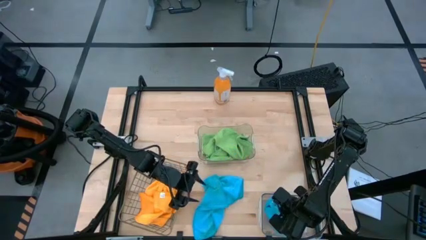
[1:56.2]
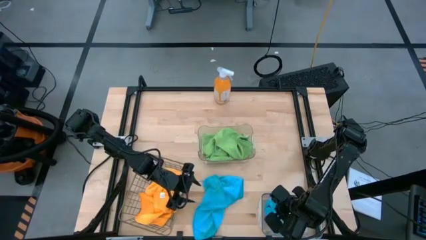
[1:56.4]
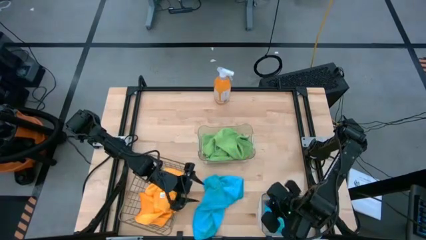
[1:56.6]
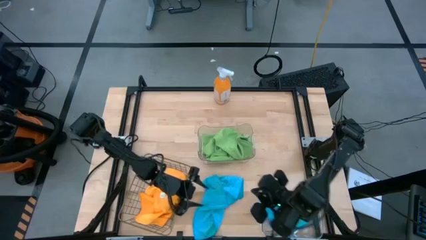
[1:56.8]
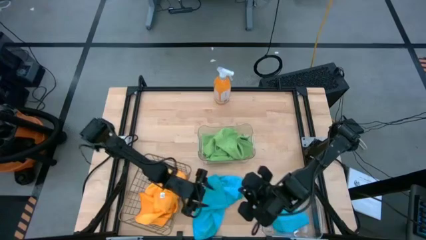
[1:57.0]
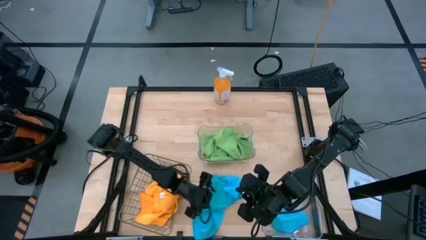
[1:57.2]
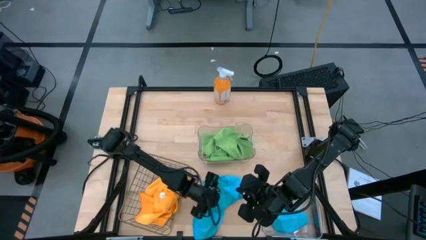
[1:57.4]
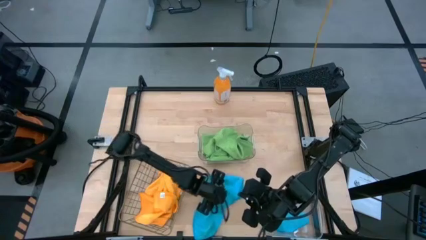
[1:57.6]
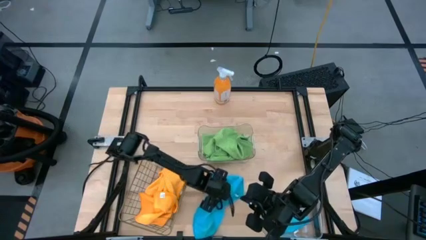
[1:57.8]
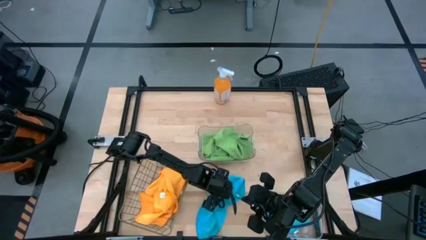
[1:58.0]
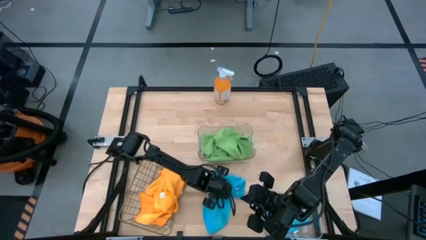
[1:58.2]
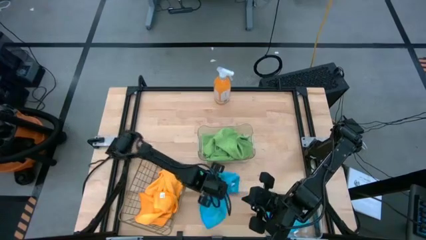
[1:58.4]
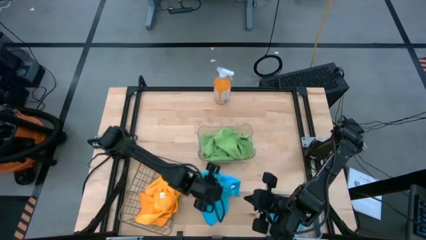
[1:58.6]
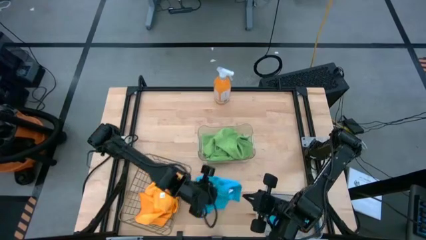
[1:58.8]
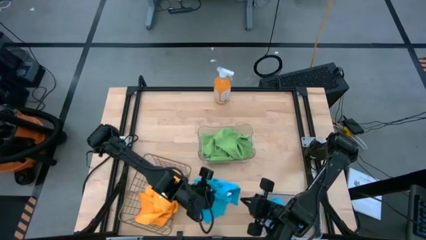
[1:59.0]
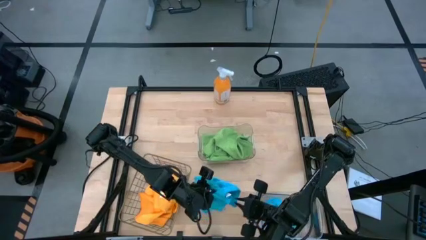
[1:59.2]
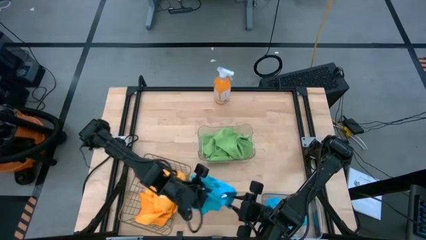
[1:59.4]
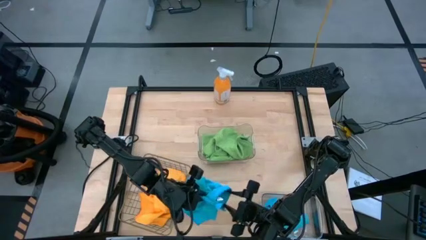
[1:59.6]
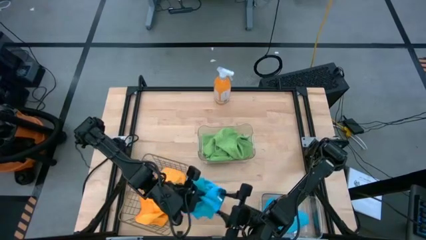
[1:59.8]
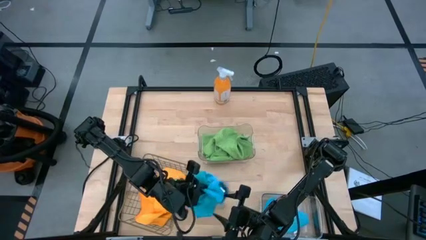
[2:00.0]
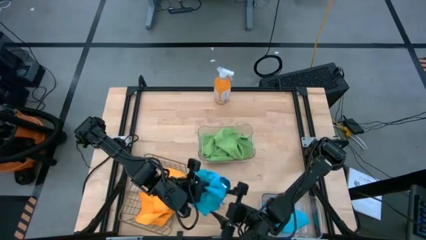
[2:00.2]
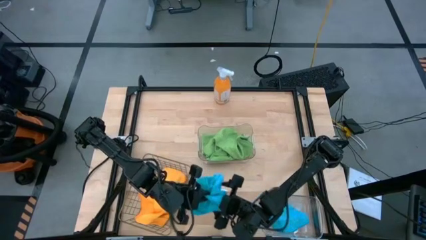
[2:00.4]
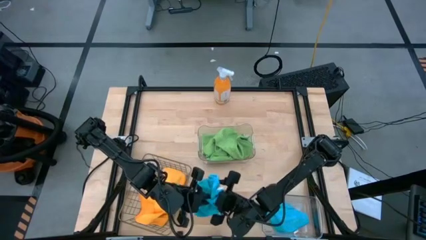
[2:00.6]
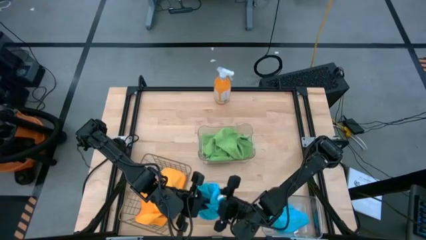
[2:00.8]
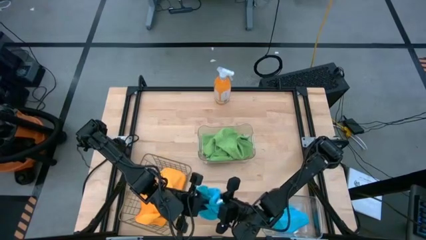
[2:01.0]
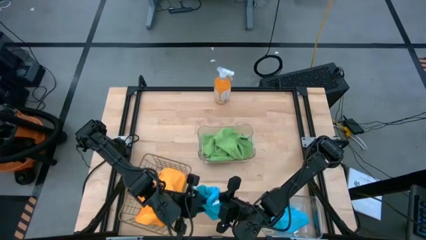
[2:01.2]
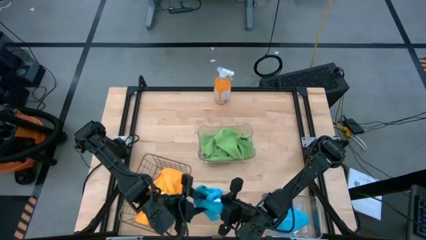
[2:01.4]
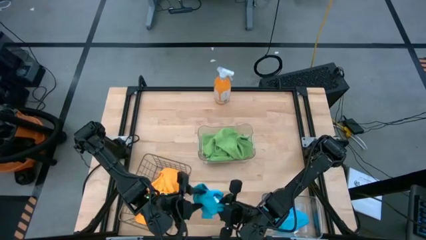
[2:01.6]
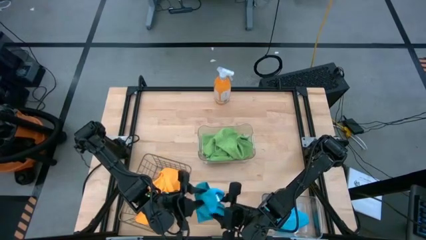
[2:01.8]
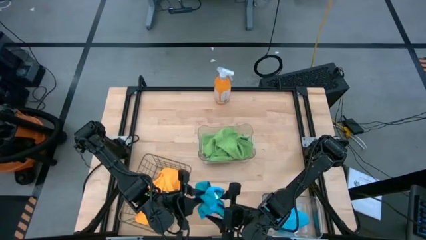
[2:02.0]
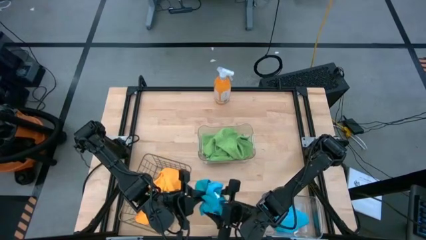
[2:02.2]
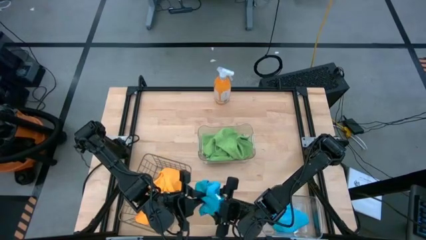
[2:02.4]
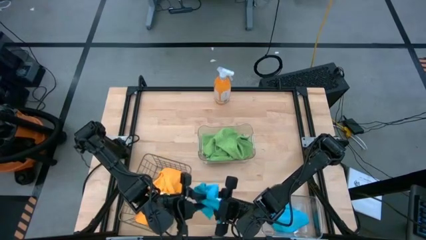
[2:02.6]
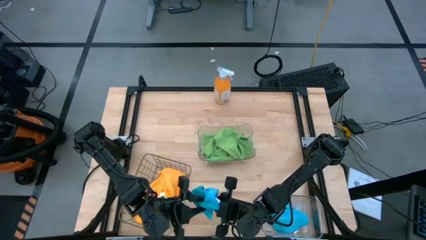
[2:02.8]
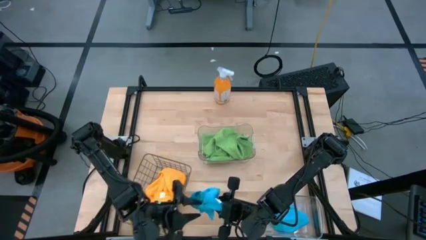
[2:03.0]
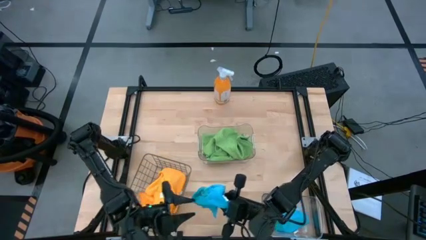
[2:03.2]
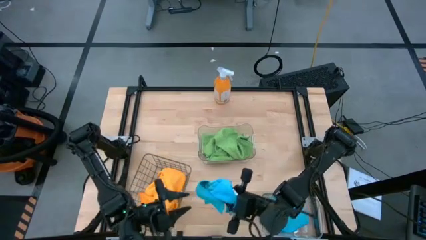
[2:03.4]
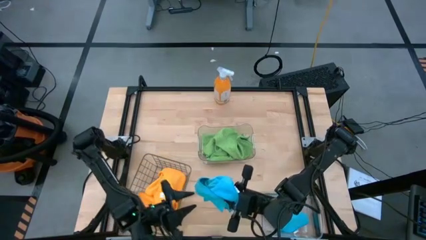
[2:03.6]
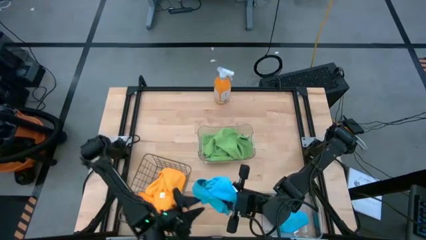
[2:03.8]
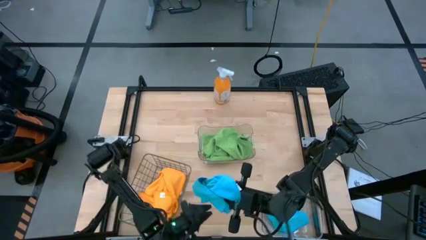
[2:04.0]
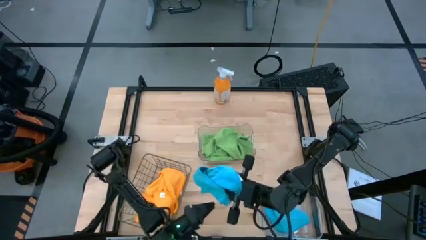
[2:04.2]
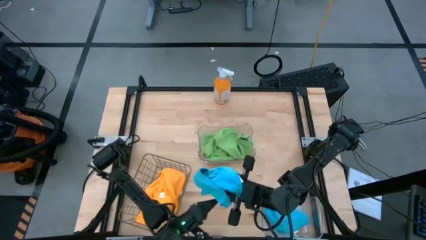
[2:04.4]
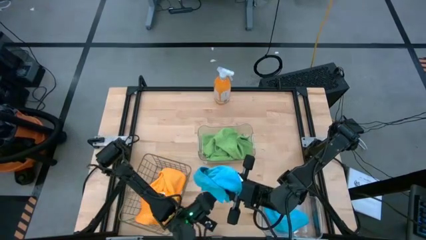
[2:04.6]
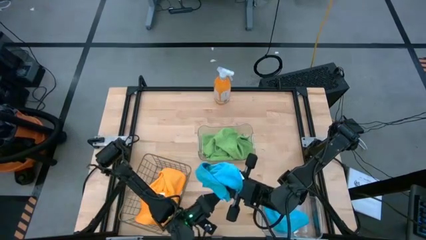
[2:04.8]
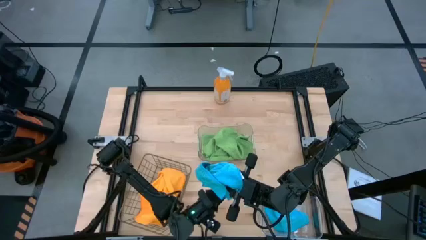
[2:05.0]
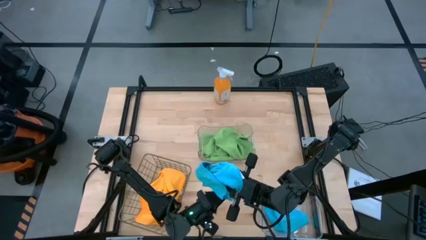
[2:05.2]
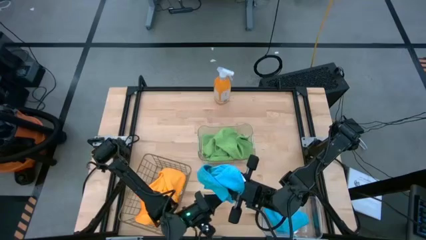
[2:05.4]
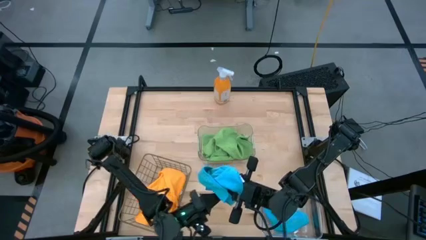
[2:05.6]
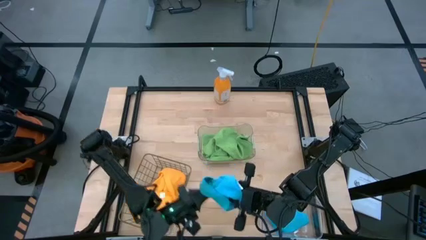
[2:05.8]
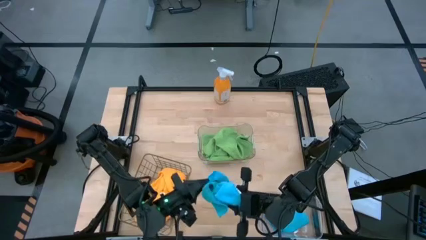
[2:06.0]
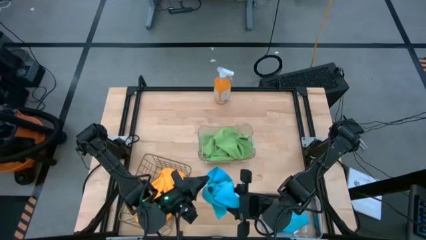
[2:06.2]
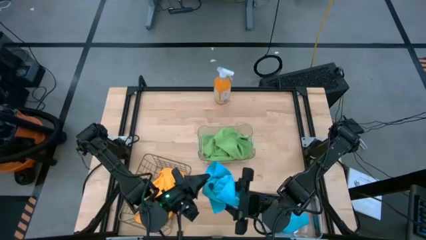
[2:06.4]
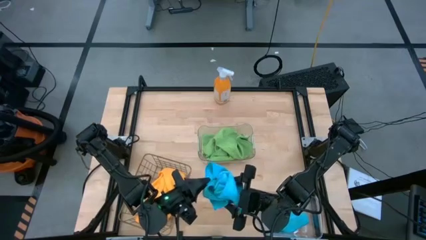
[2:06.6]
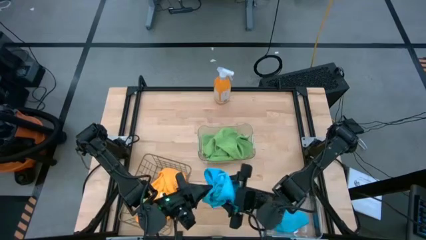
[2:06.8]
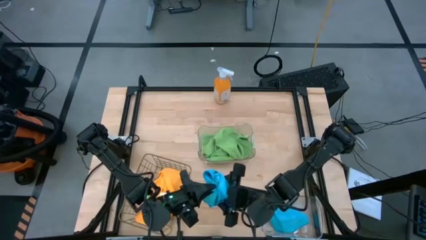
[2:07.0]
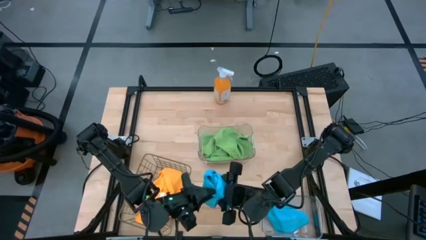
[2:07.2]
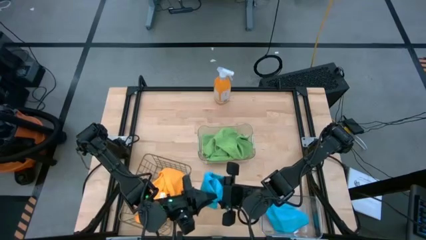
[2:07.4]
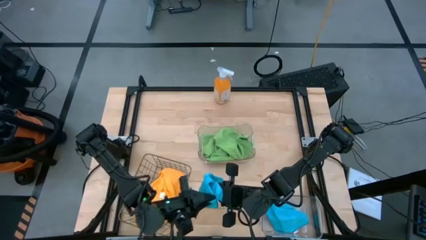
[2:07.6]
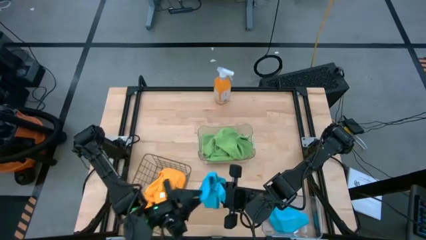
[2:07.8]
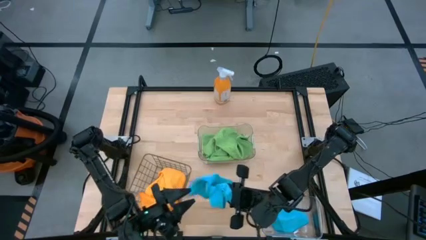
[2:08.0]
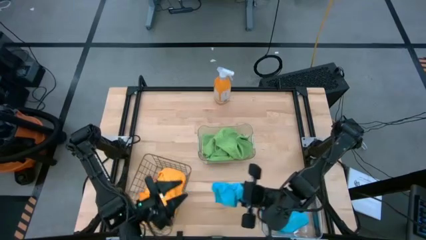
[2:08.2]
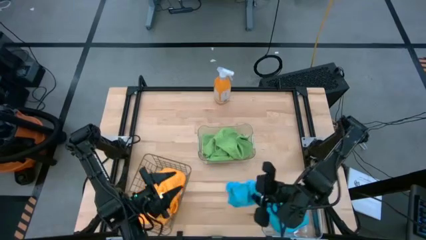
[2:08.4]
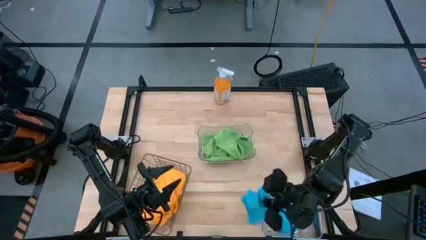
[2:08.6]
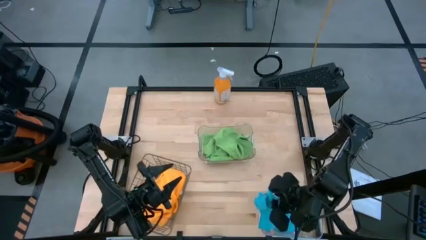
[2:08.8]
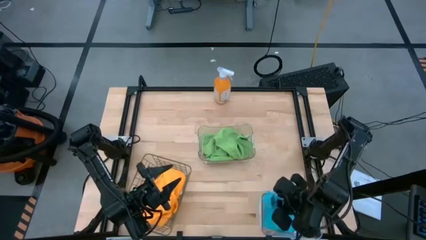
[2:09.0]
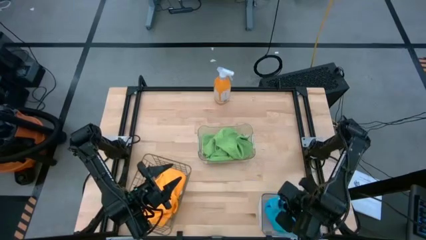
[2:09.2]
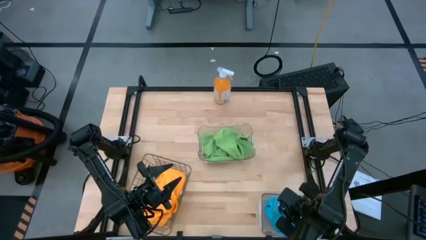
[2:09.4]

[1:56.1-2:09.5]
Task: Sort microfiber towel by color & place in baskets
Put the blue towel into the bottom transparent bin

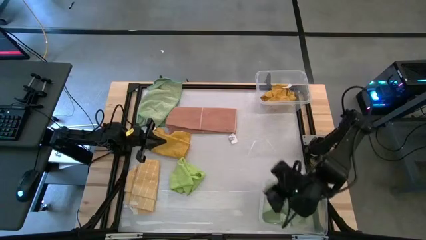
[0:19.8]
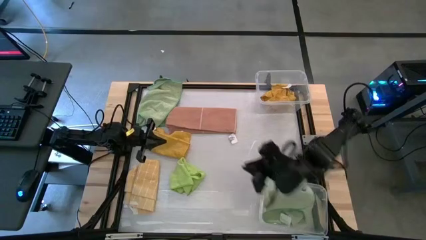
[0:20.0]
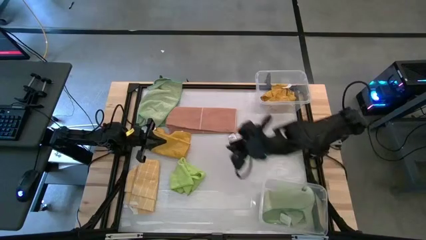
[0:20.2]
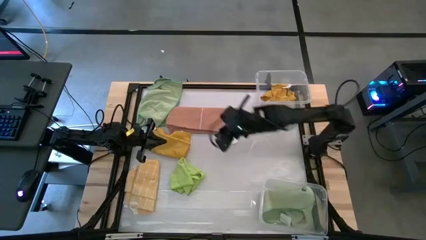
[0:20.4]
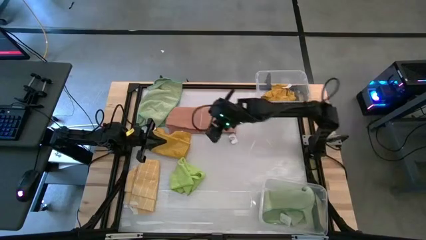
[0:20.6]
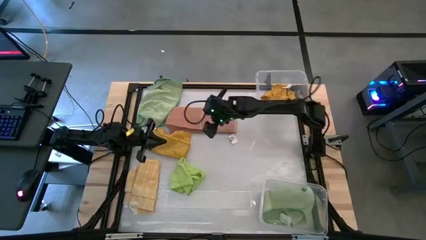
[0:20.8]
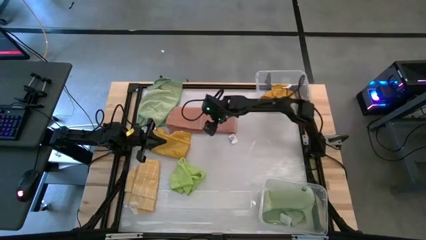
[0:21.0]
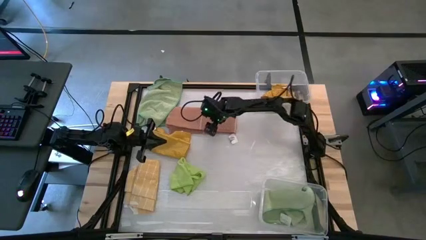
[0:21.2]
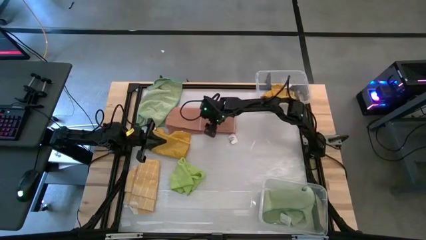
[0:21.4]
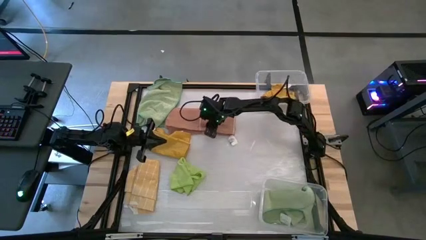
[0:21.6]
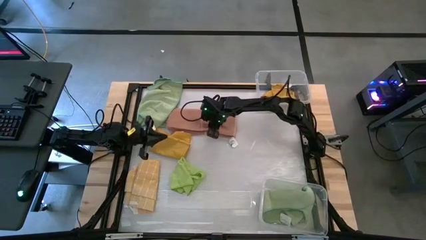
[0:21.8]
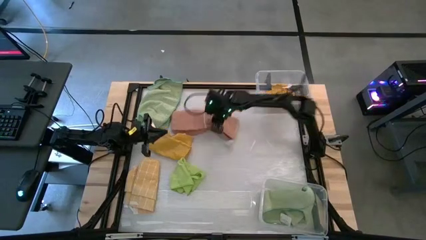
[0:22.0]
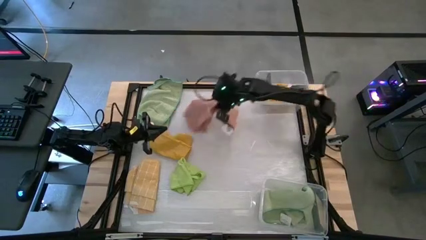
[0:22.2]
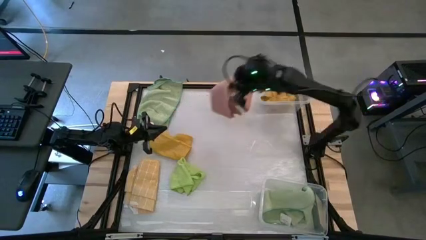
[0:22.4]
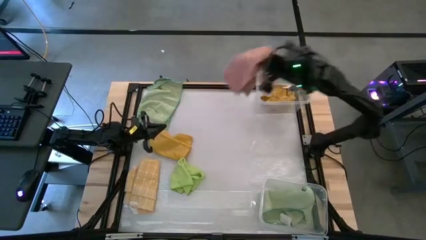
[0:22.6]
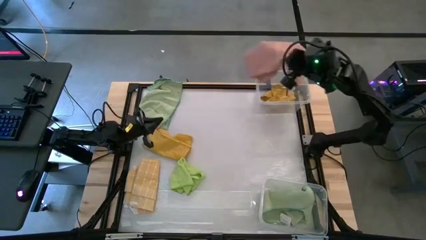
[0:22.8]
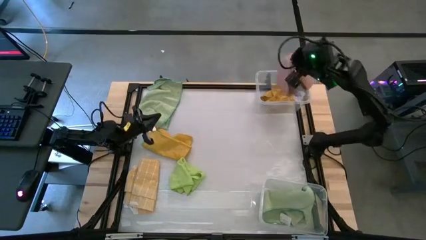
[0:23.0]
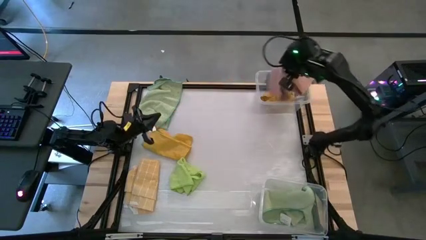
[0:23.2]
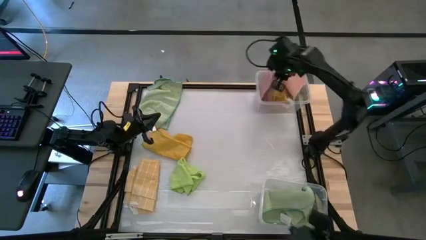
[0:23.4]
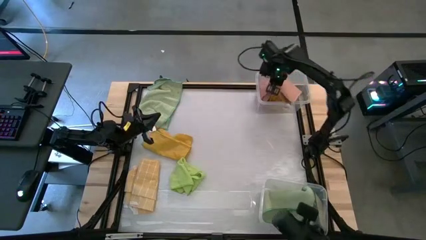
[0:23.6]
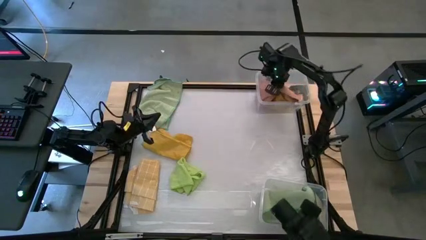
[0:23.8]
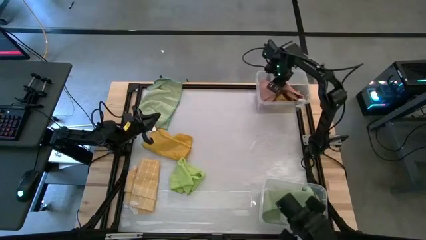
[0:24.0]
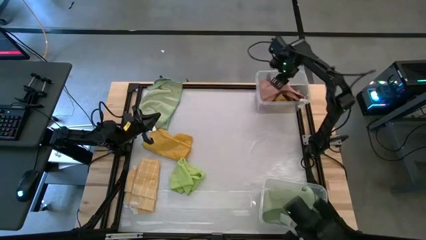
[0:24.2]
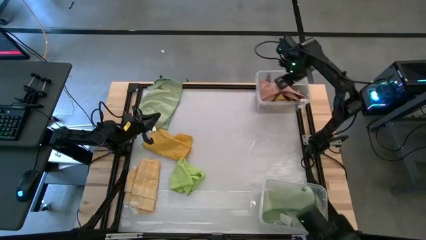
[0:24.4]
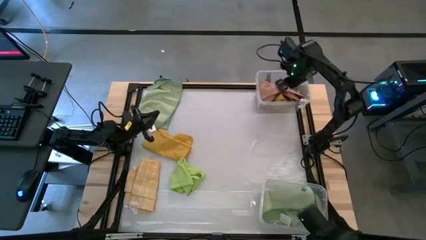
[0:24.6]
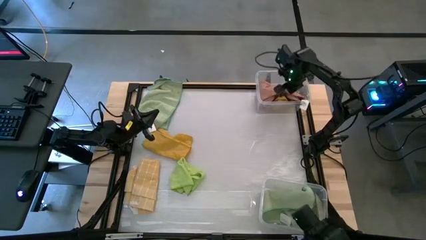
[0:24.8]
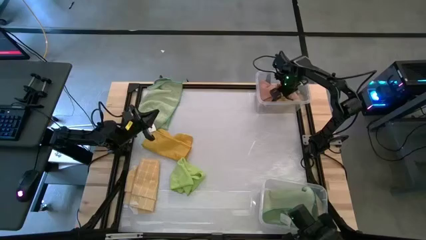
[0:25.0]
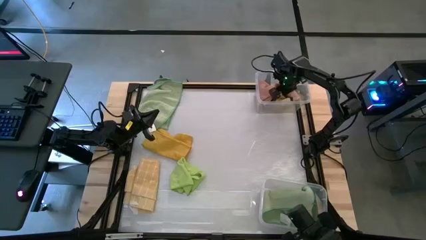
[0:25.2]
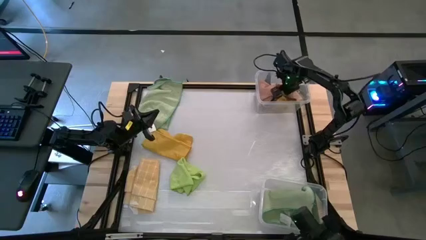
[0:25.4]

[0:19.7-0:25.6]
Task: Sort microfiber towel by color & place in baskets
Put the light orange towel into the top transparent bin
